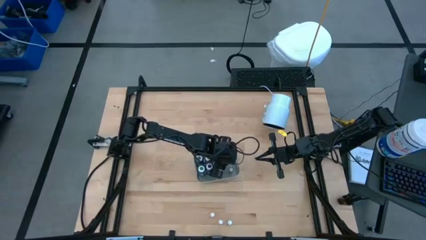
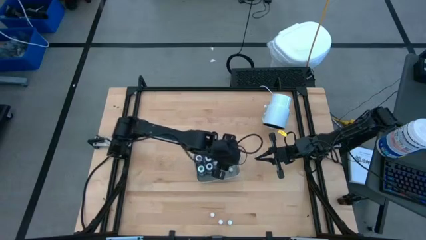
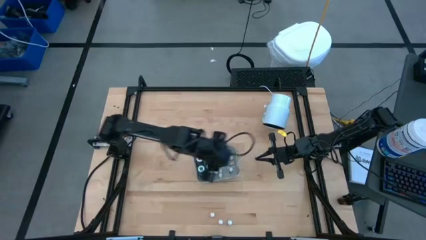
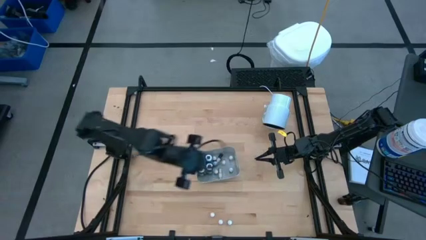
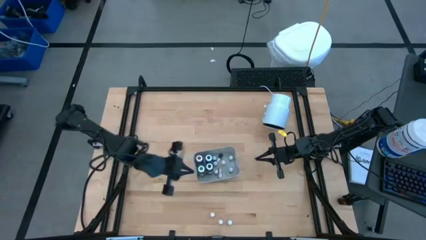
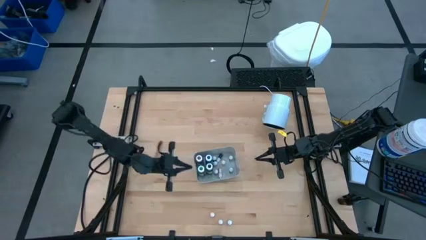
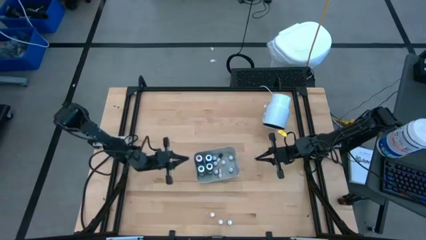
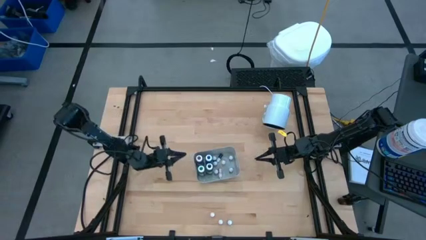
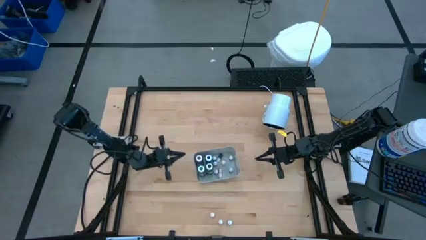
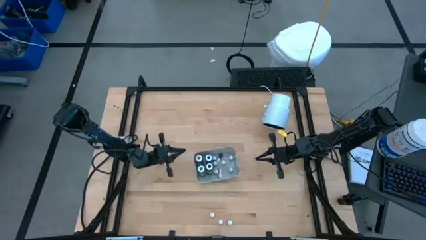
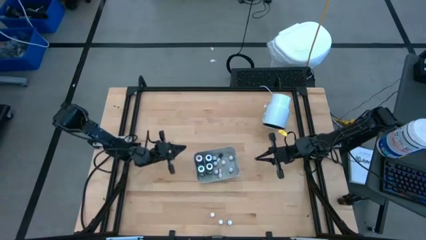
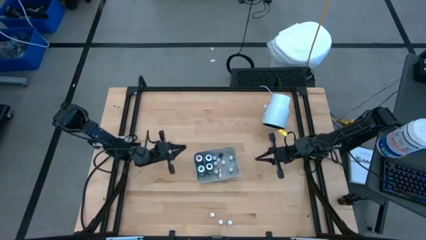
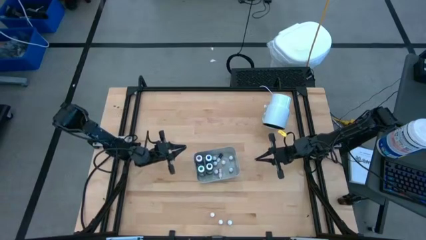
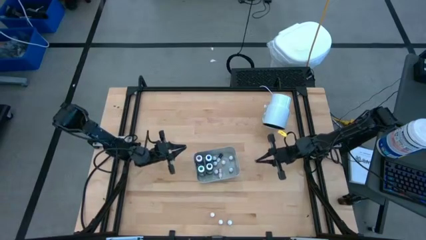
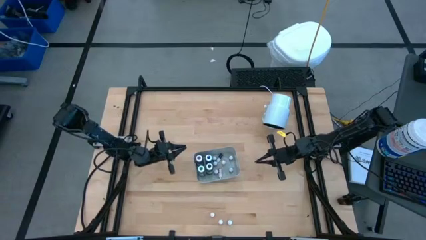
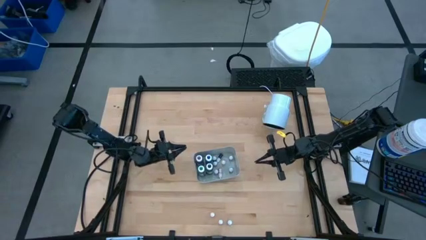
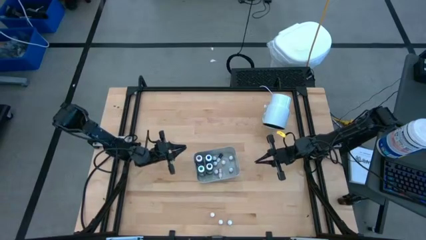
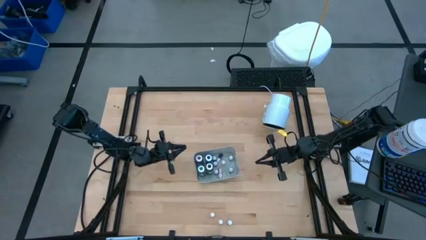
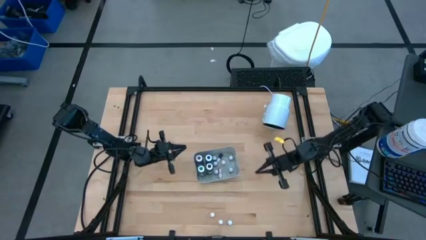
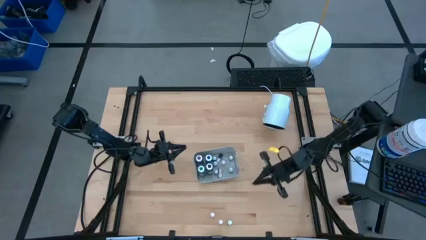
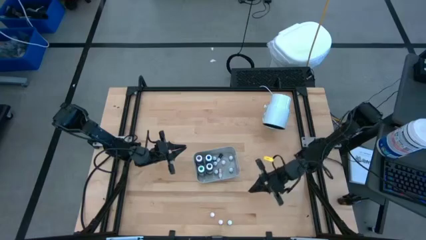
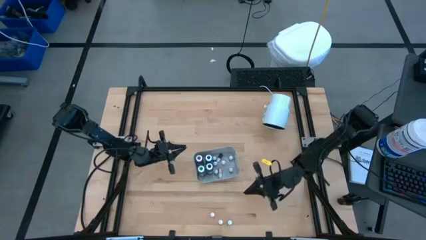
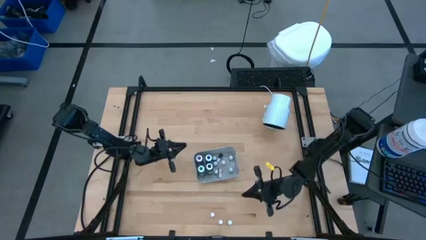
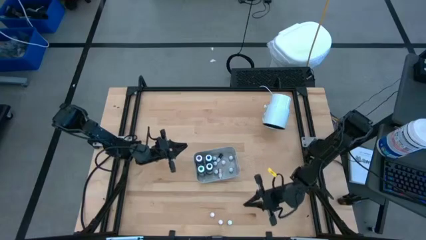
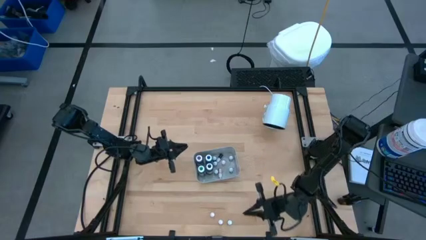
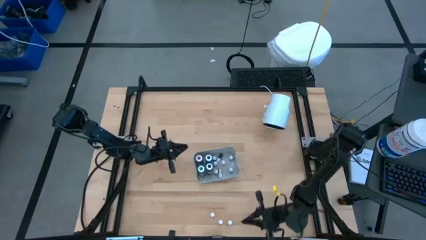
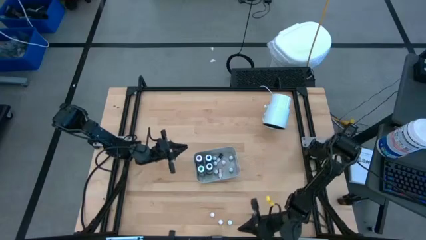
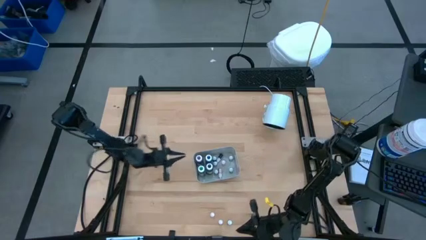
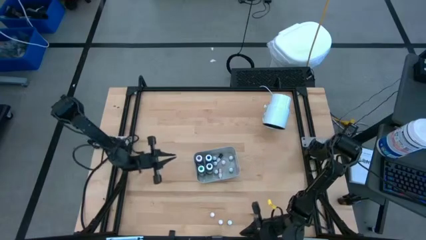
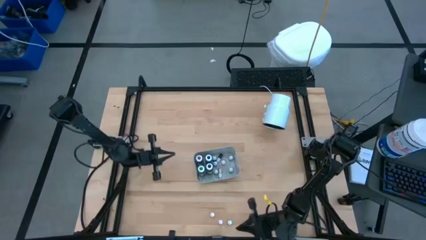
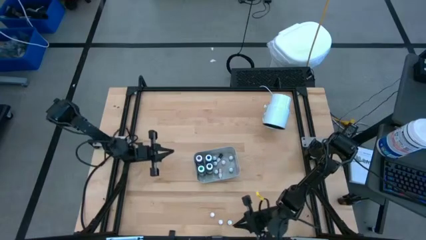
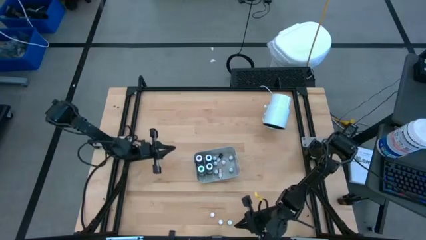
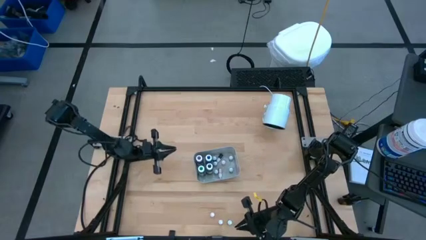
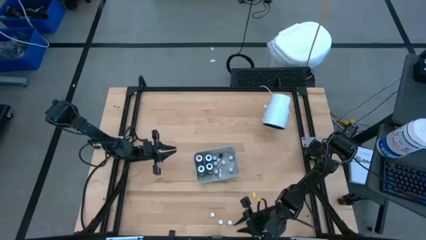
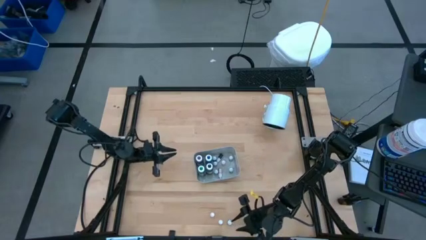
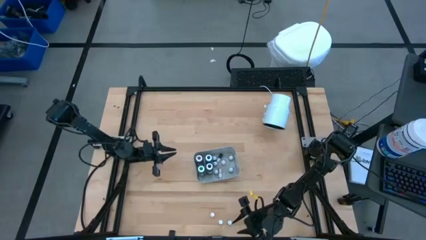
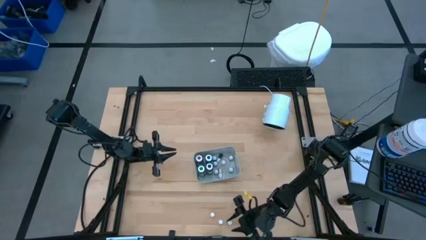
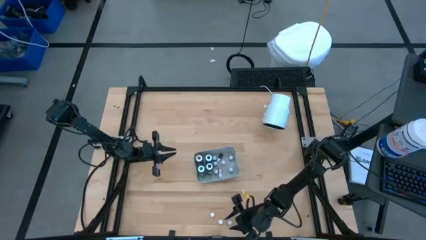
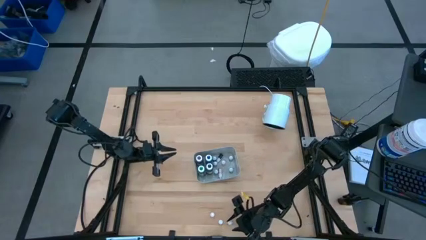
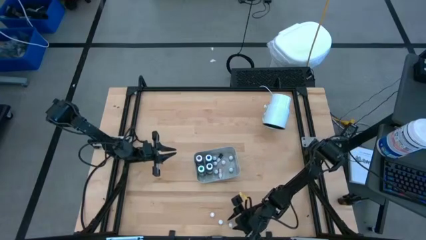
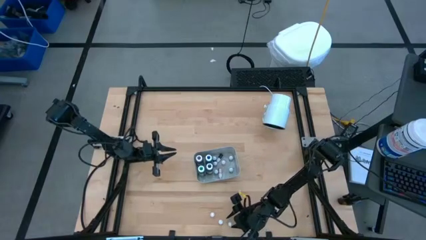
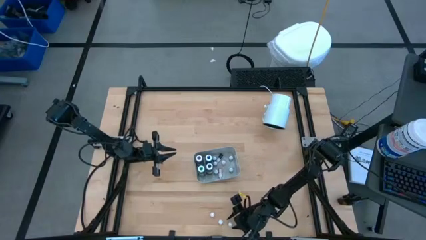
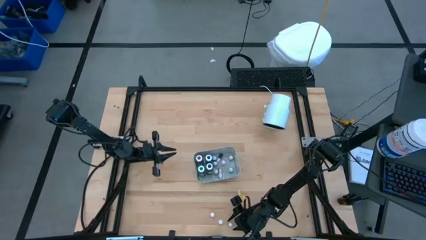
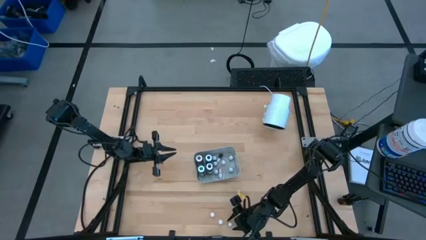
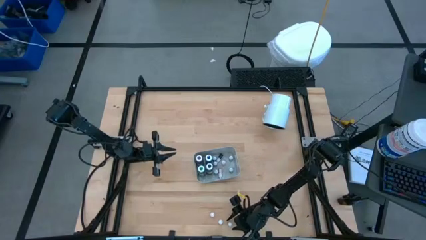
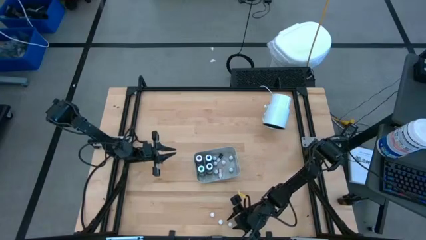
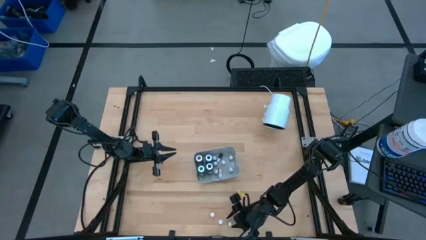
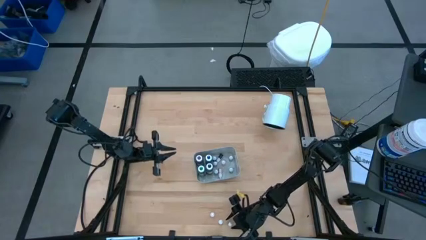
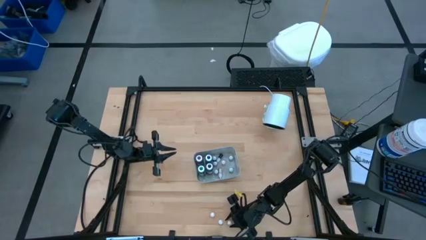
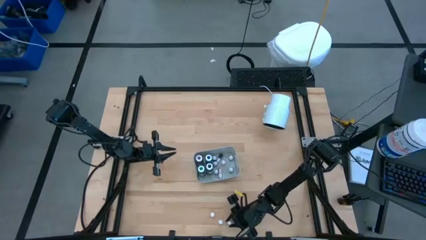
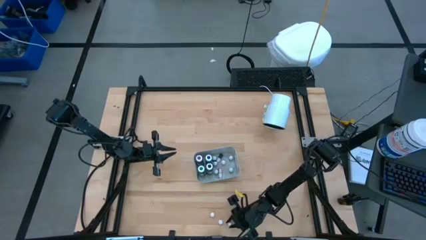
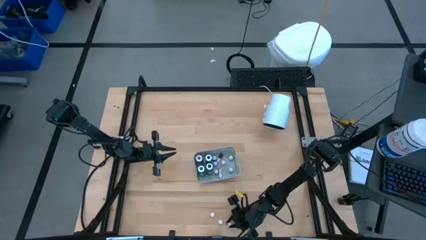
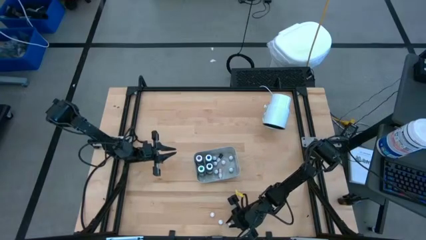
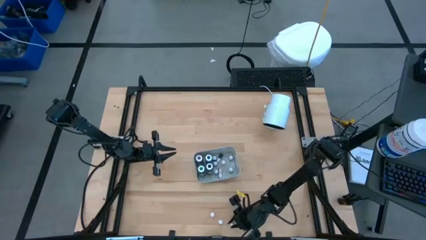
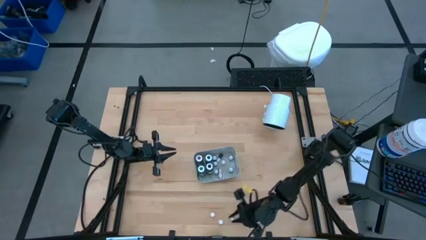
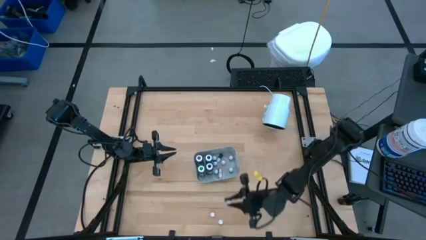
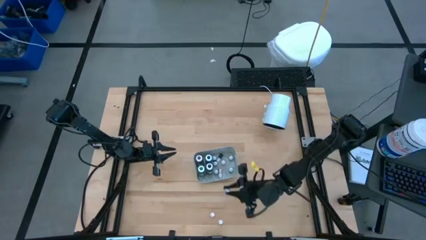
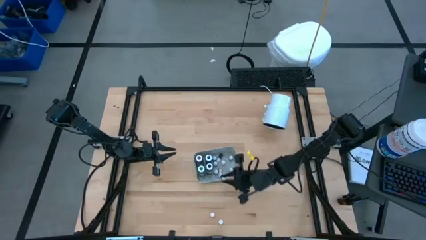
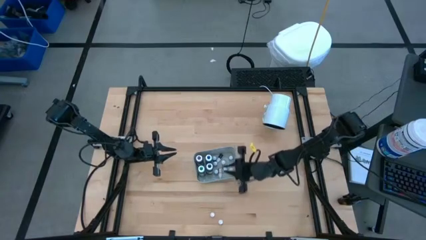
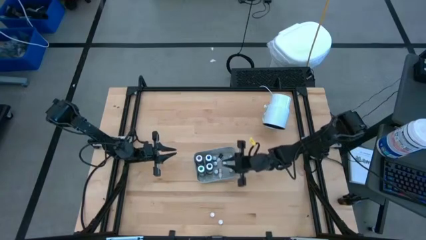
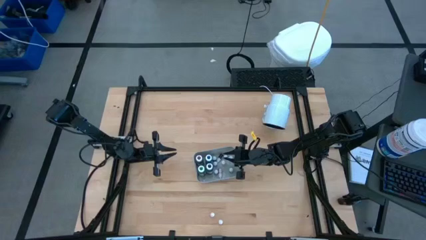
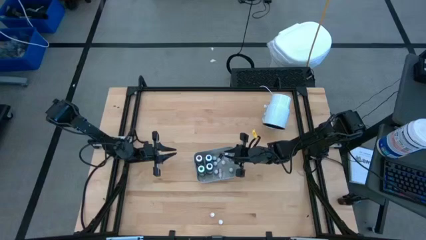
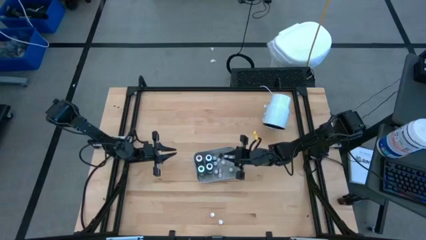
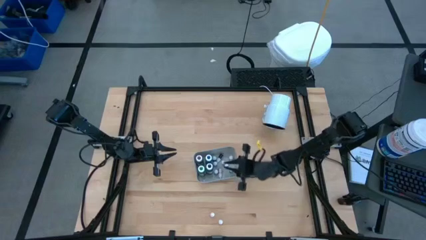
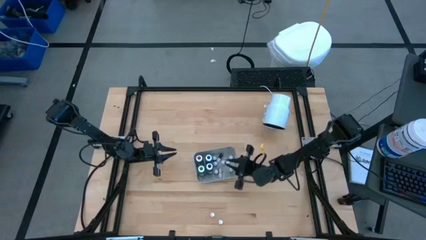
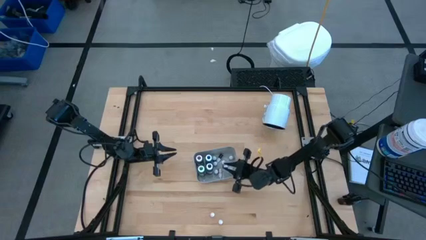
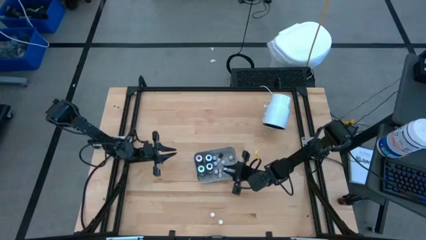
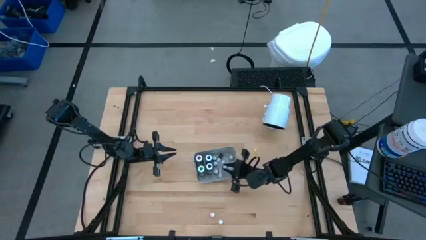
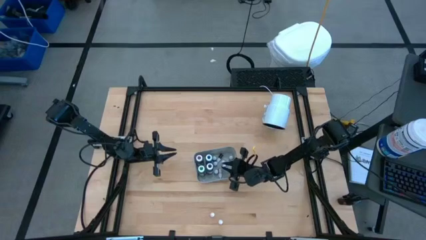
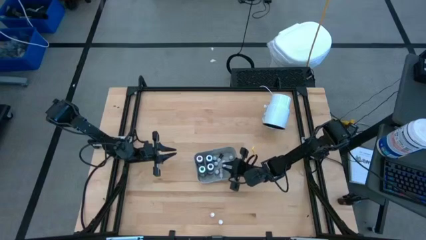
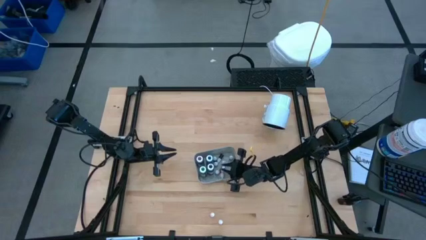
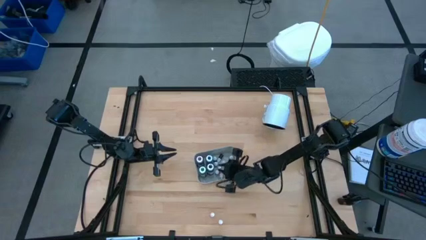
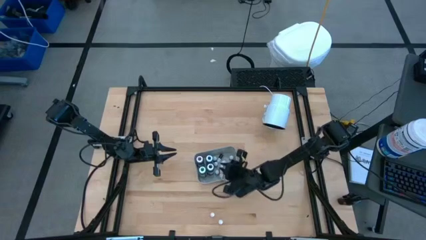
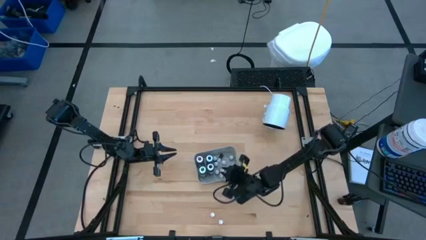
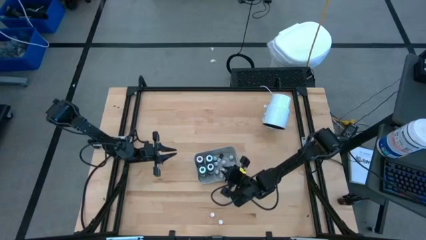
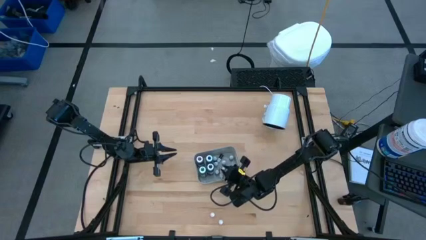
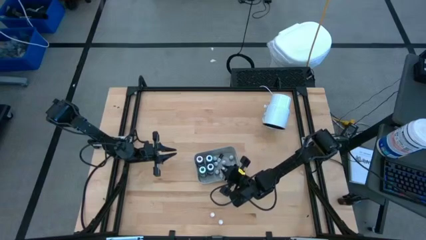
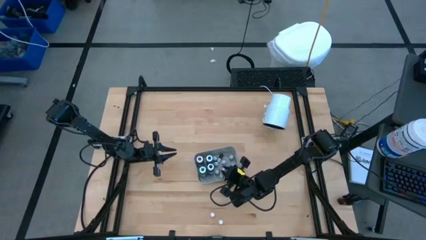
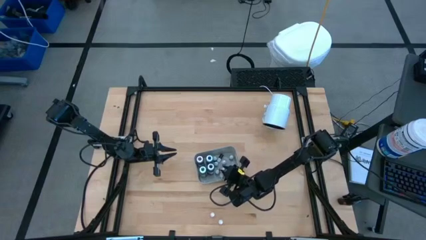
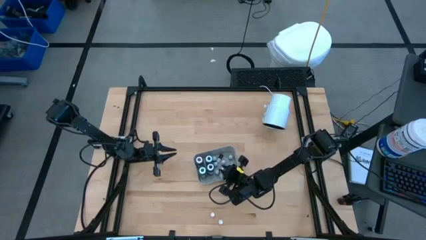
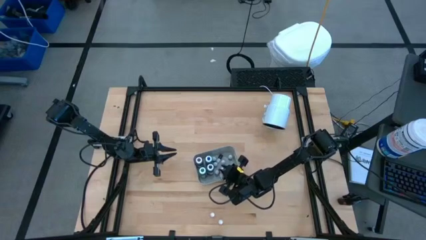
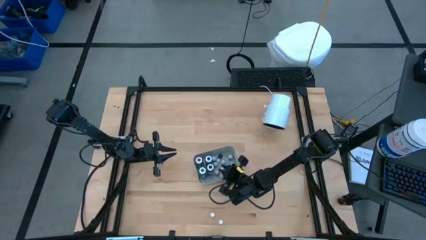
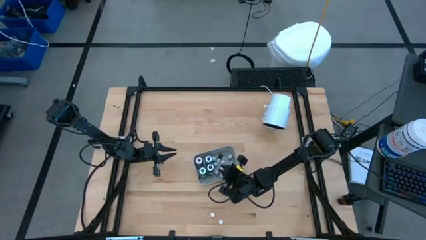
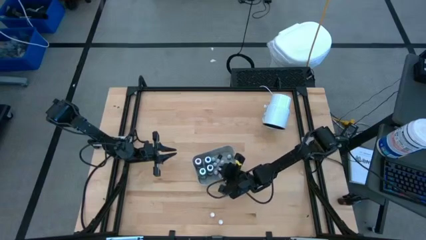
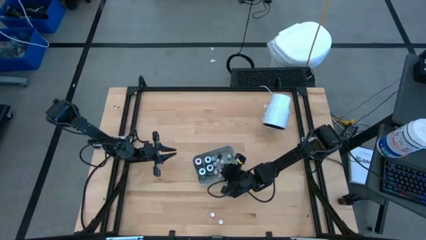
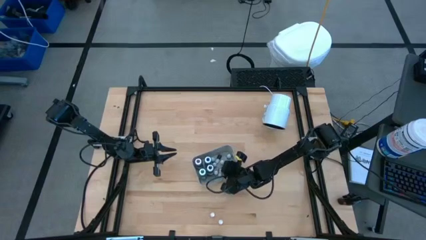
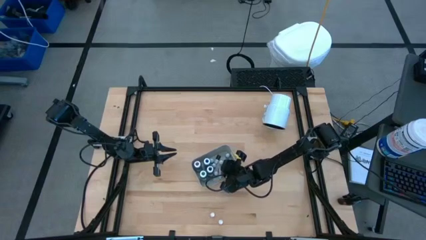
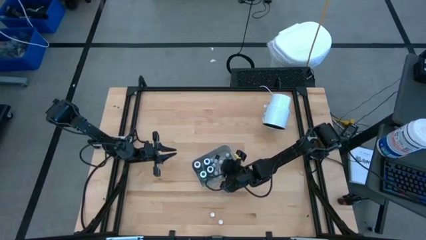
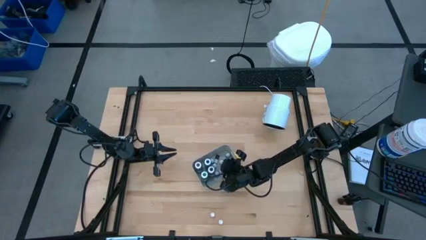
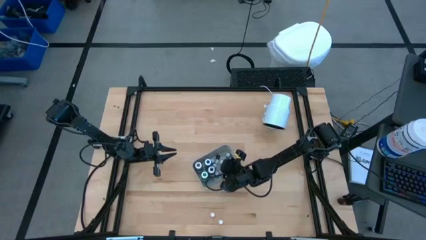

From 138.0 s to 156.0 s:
Task: Pick & Place food coloring
Put the small blue food coloring bottle into the gray bin
